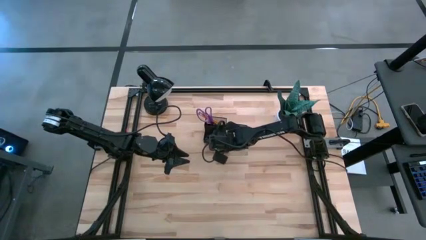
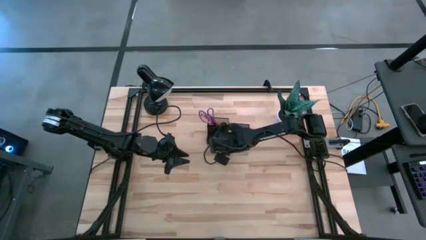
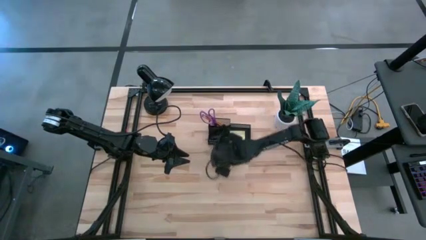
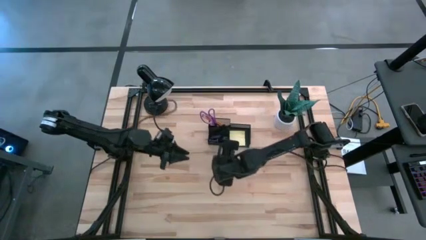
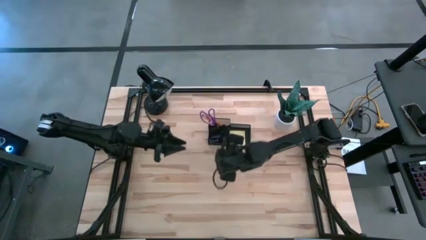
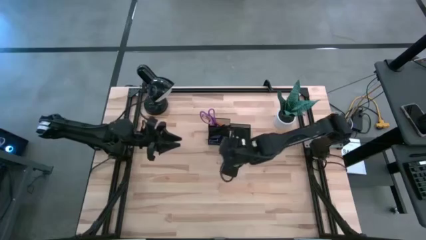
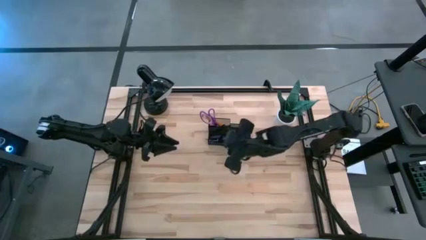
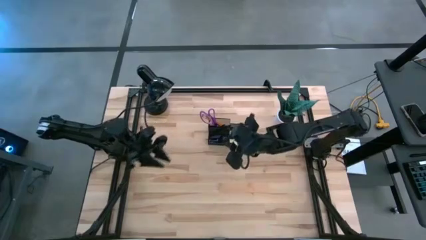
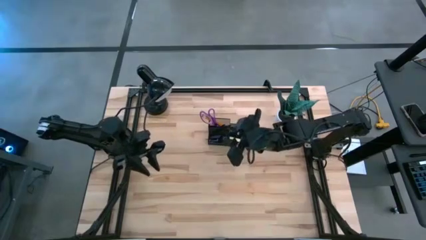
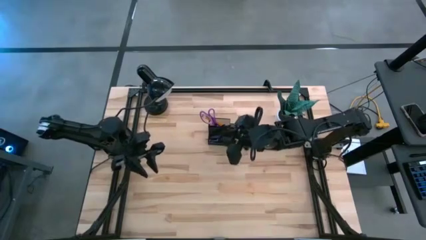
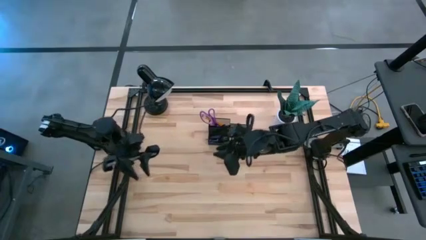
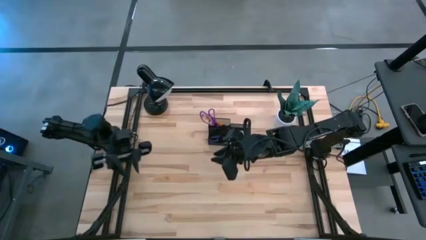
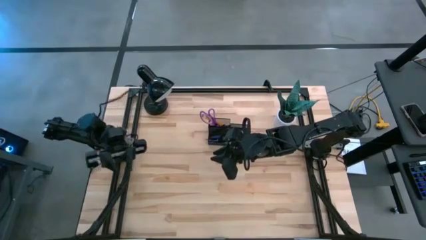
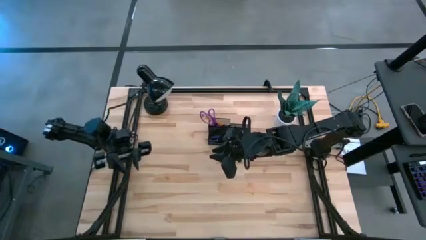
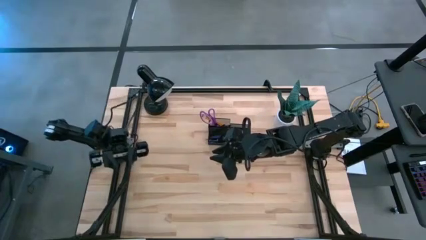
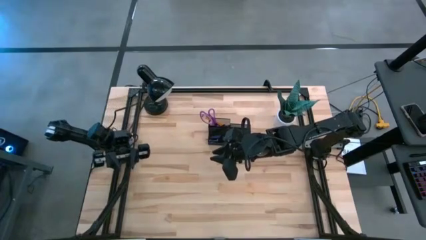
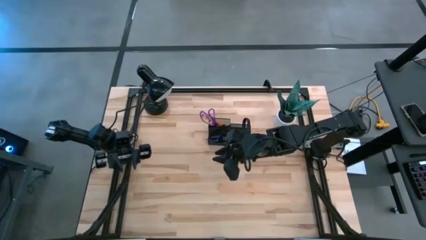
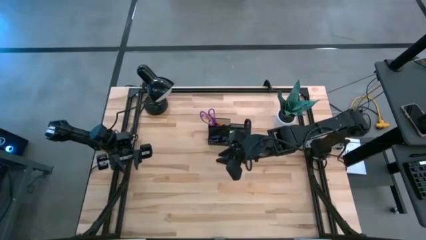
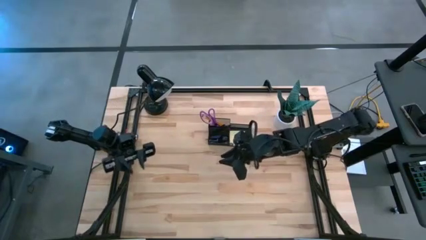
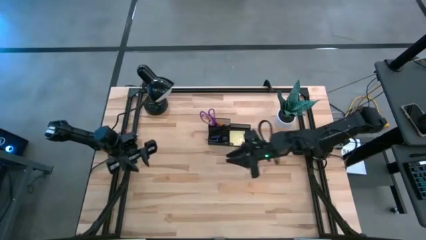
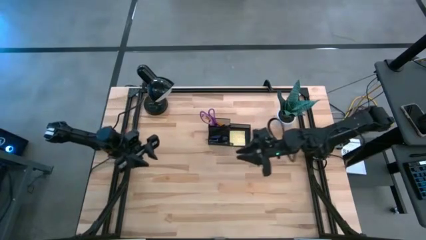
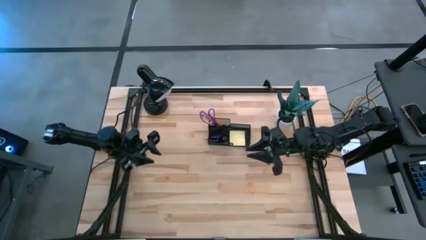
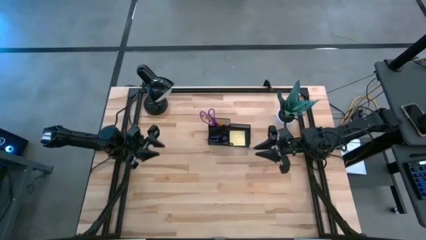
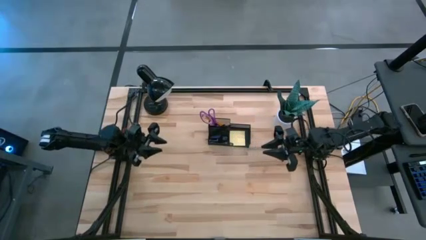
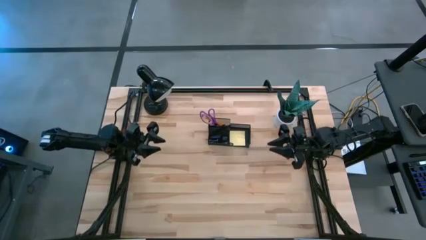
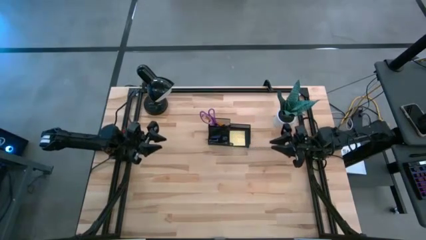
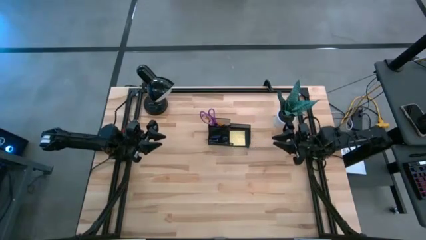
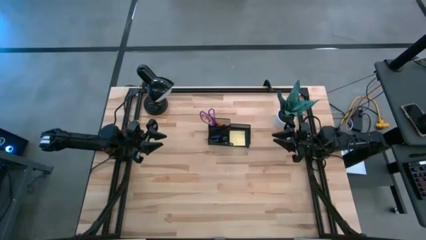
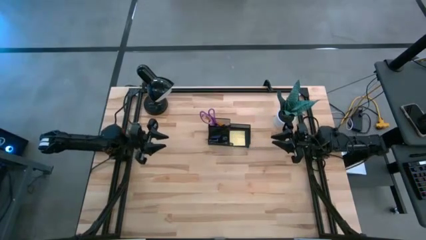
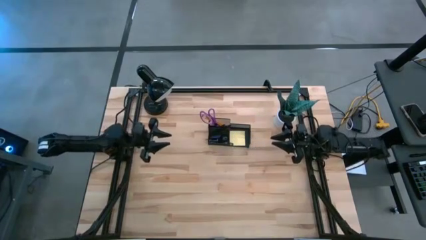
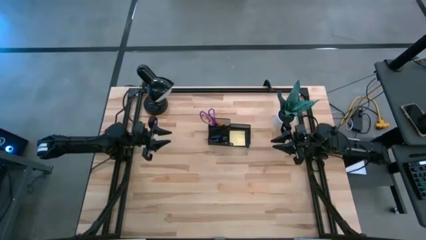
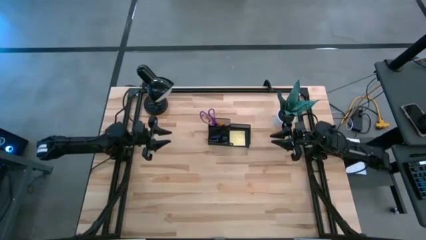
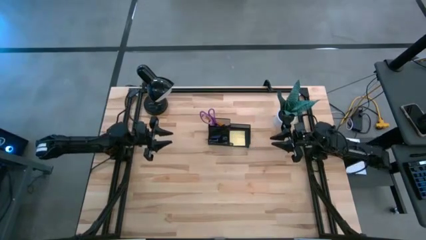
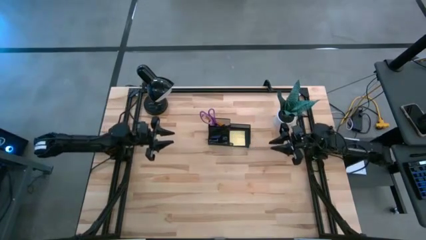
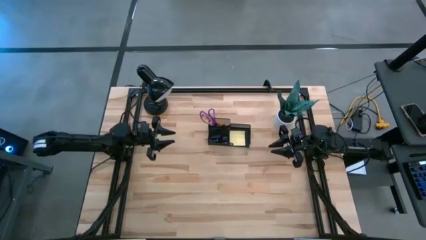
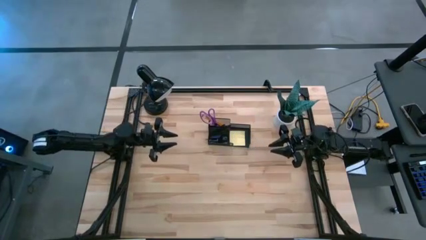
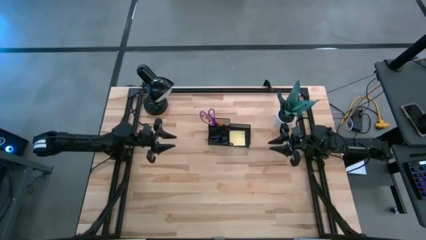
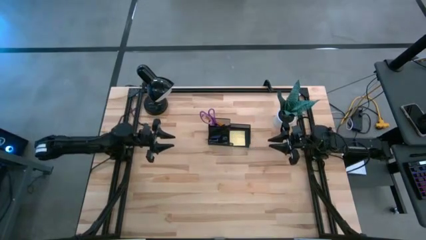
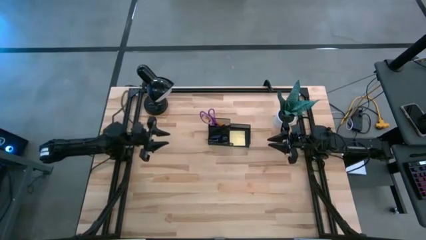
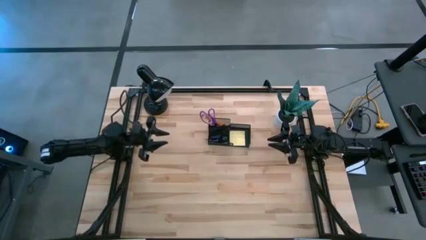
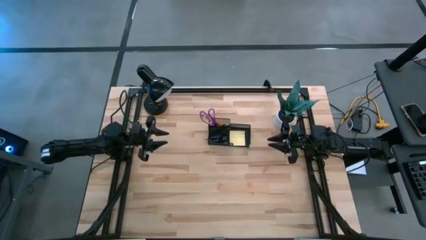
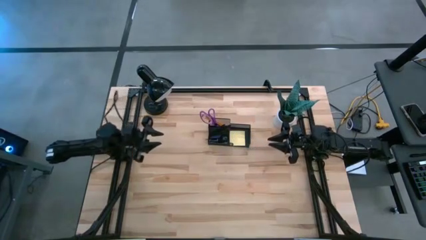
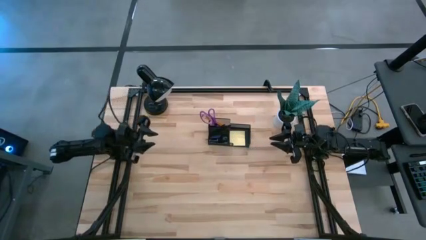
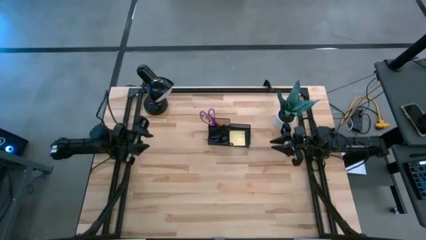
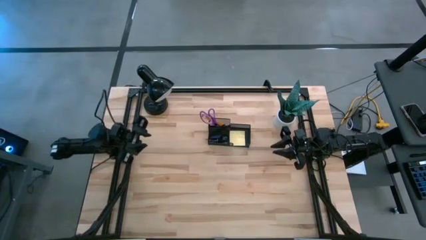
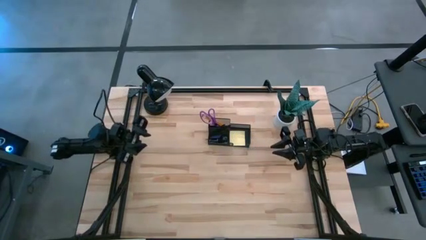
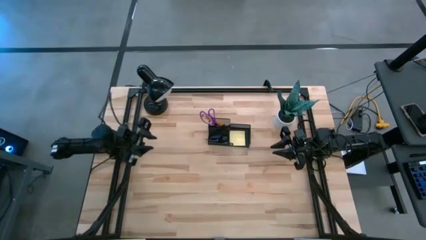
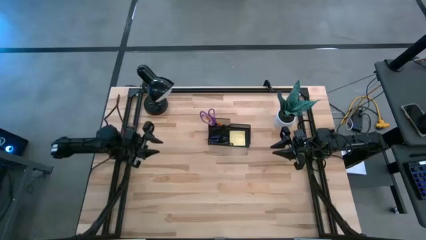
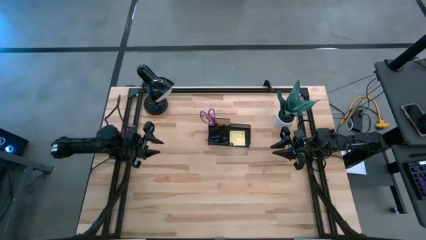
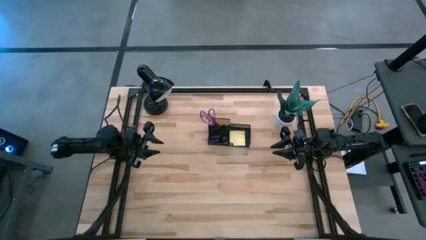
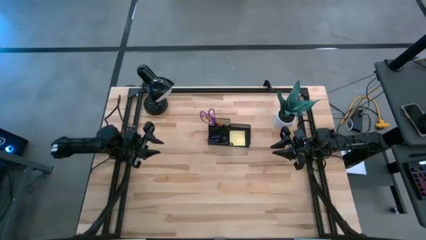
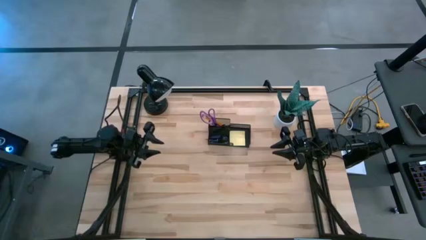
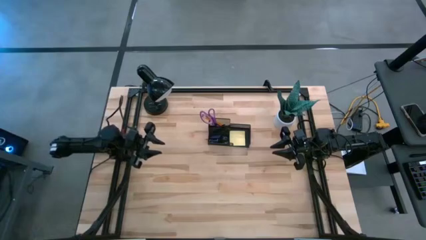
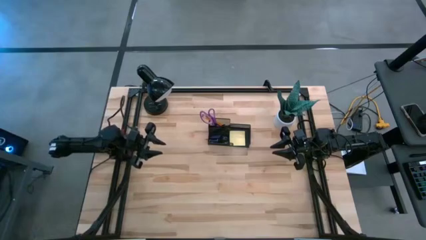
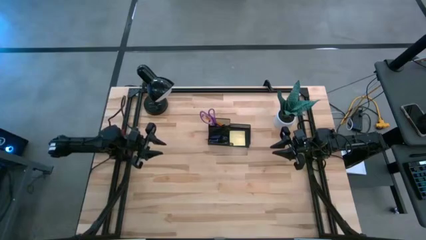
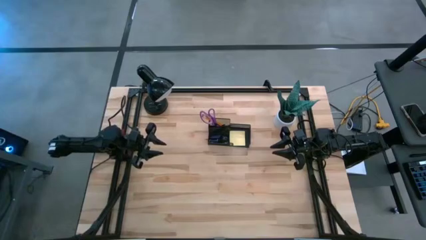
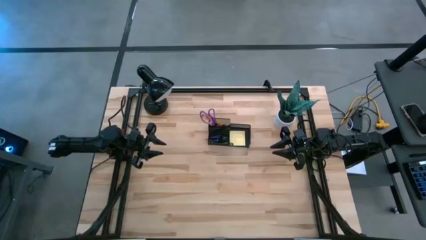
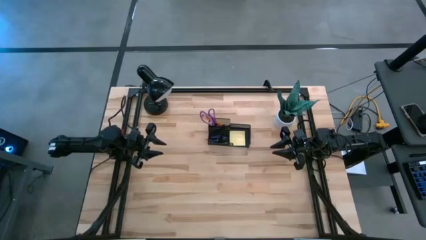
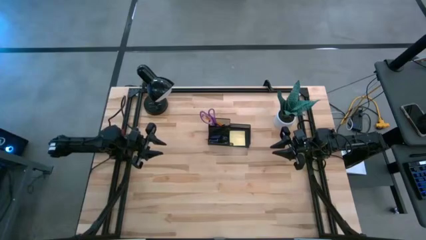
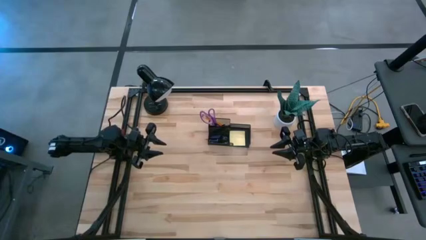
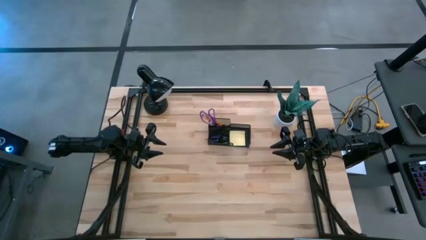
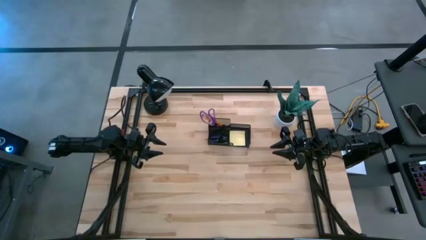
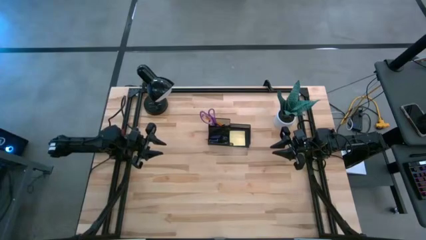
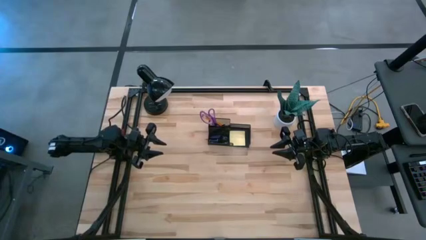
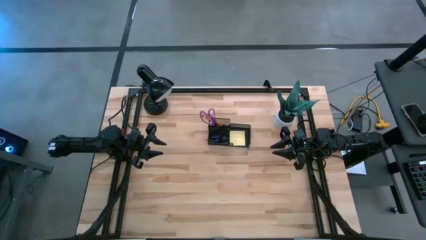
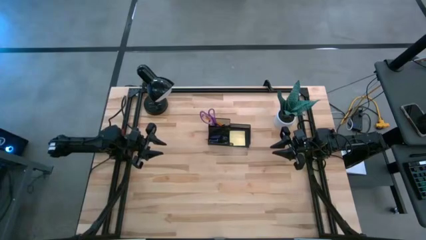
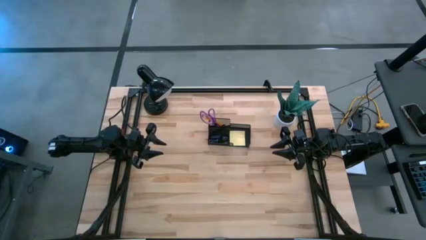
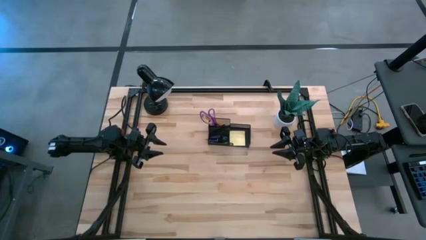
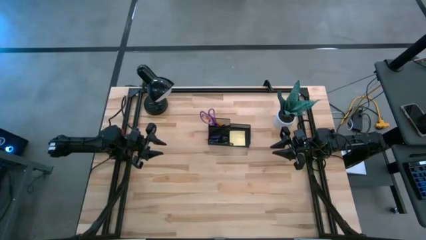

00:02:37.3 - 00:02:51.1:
Task: Pick and place office supplies into organizer
Return to Home Position

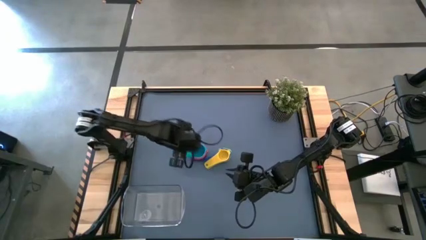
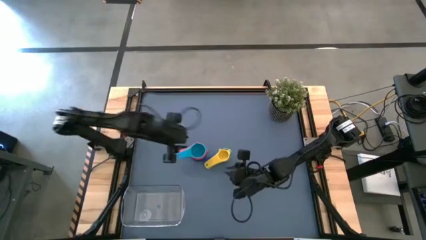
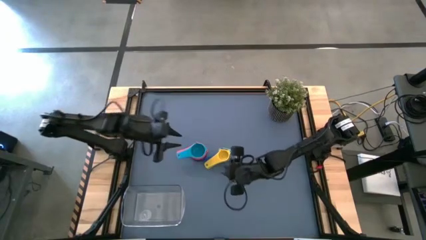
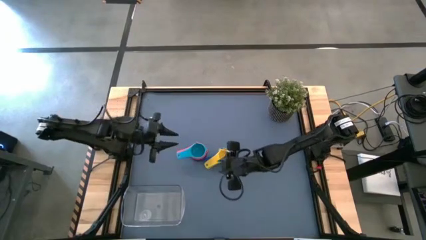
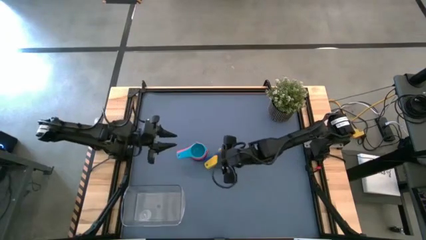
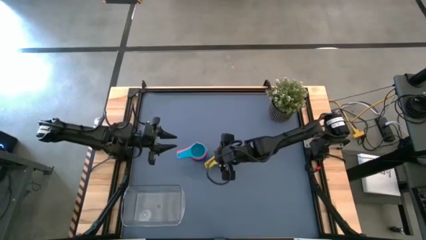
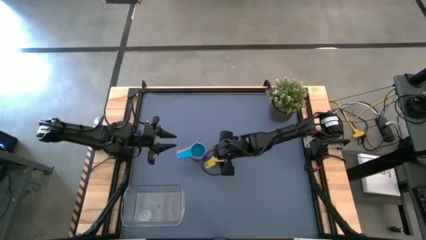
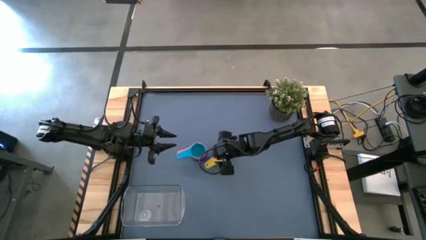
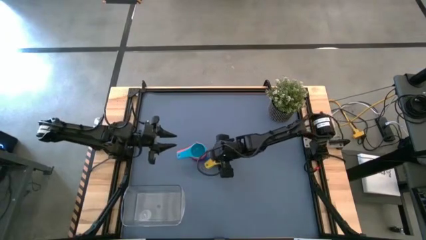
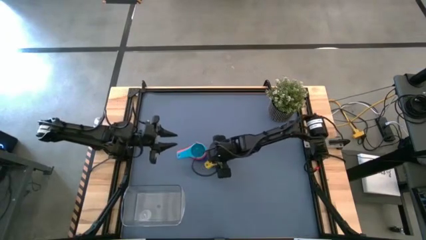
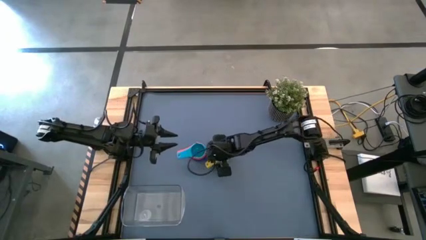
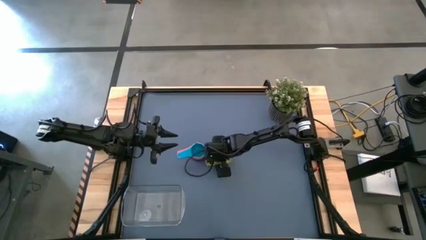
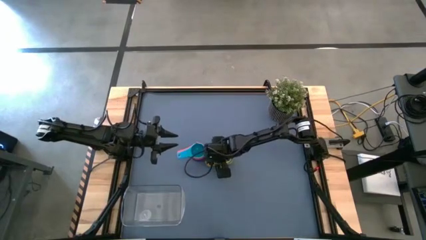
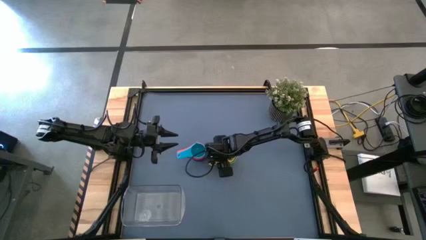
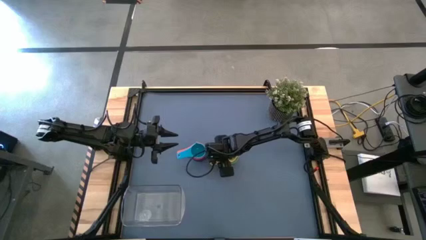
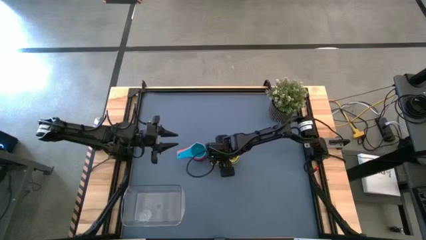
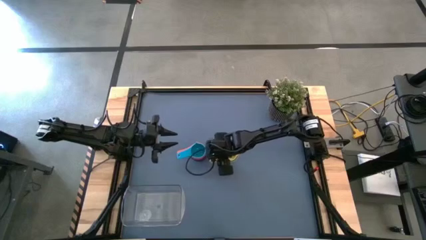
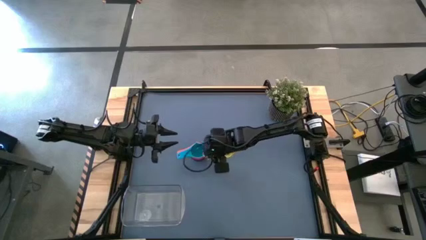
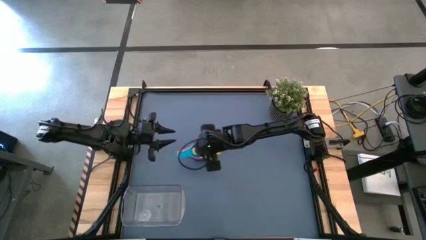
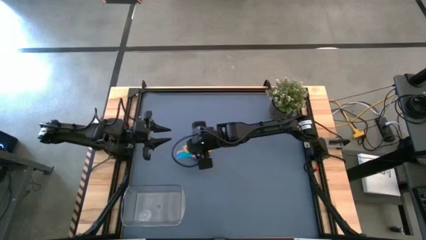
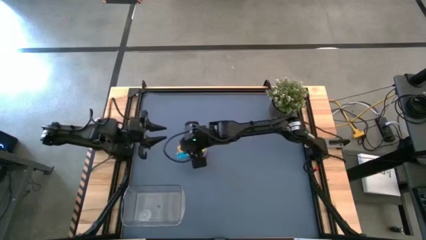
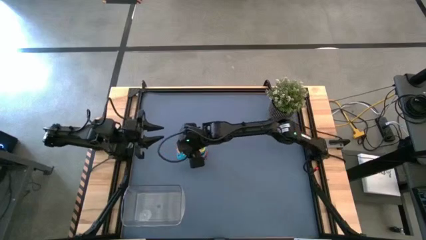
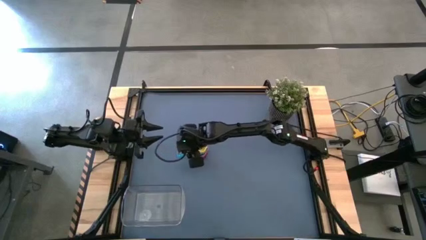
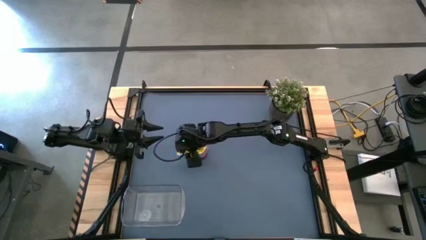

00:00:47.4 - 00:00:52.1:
Task: Nest measuring cups in basket
Stack the green, blue and yellow measuring cups on top of the light blue measuring cup
